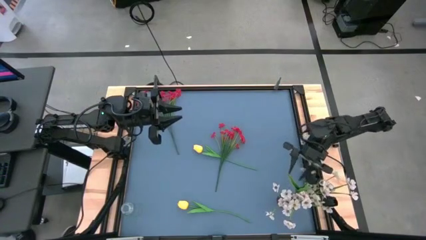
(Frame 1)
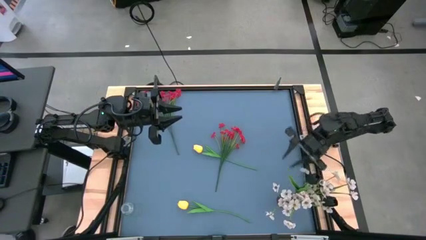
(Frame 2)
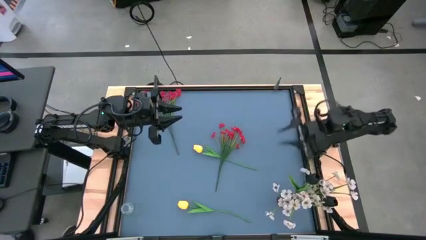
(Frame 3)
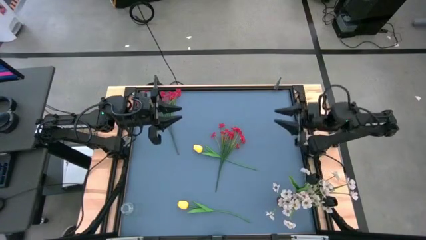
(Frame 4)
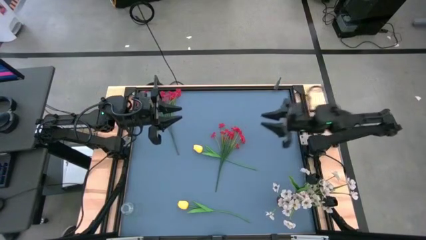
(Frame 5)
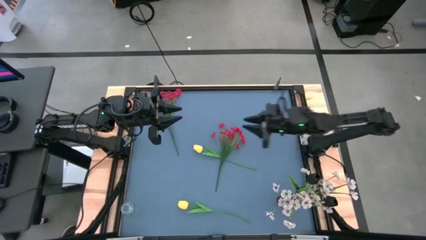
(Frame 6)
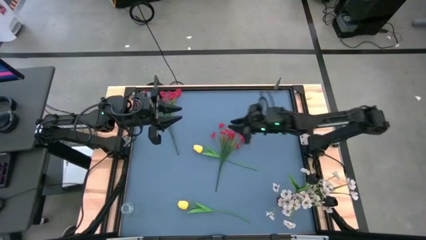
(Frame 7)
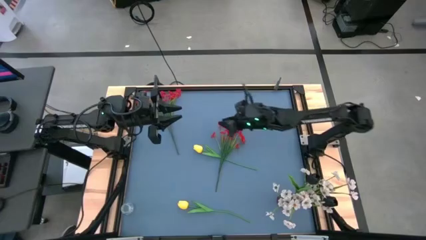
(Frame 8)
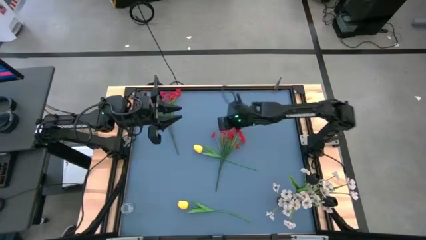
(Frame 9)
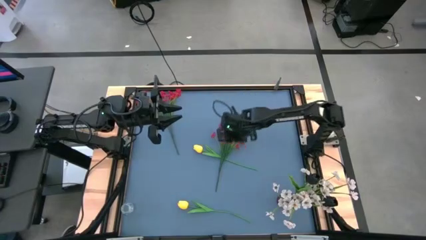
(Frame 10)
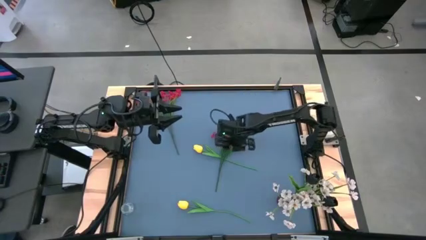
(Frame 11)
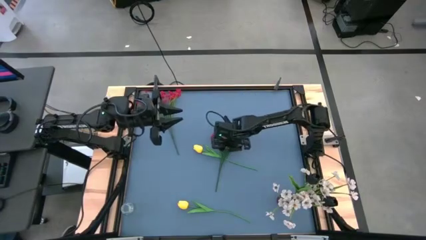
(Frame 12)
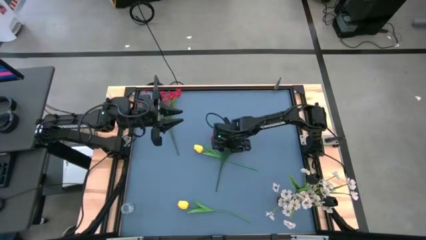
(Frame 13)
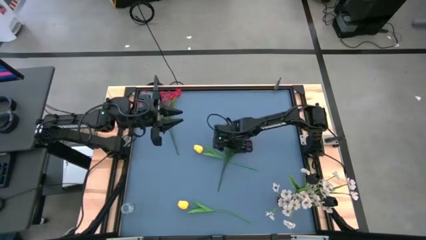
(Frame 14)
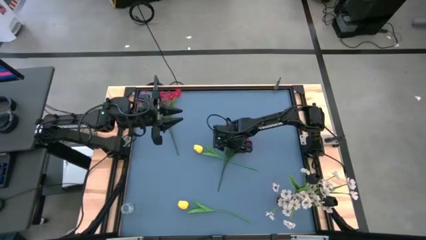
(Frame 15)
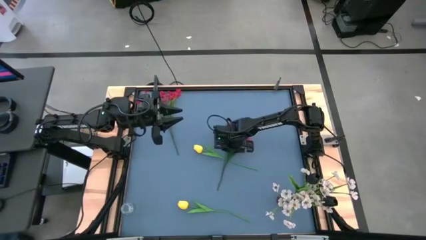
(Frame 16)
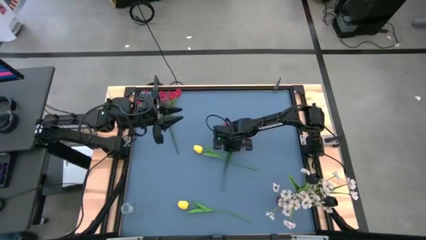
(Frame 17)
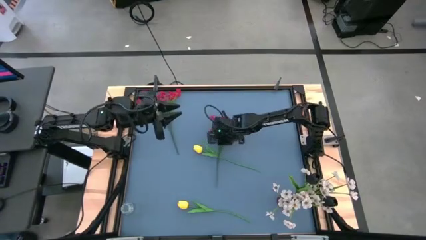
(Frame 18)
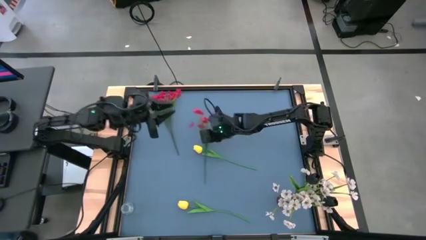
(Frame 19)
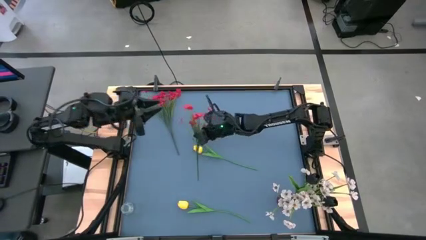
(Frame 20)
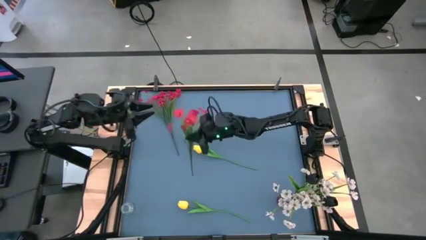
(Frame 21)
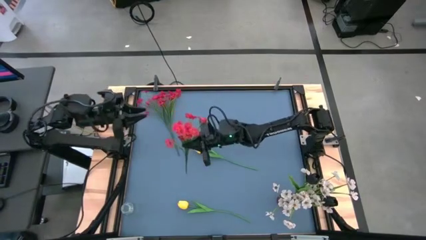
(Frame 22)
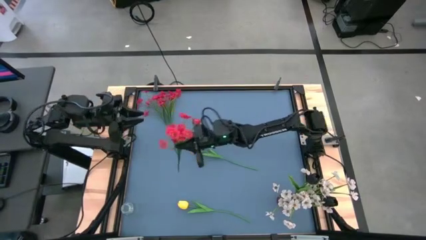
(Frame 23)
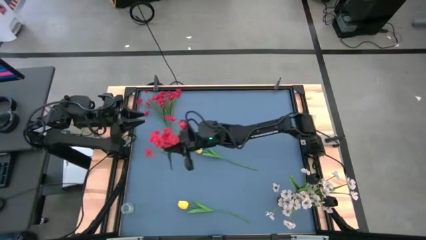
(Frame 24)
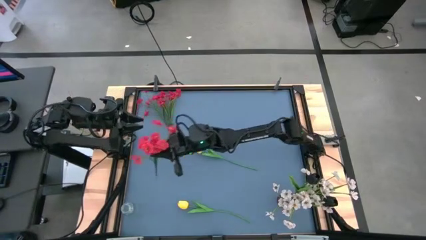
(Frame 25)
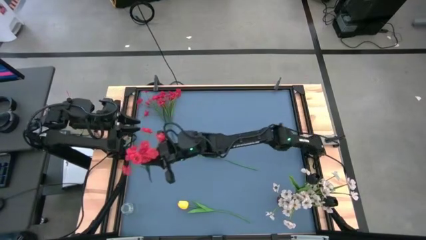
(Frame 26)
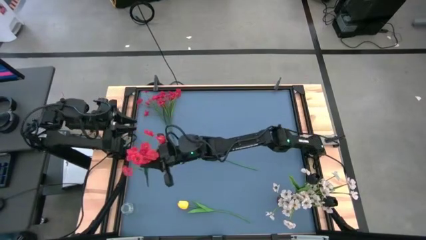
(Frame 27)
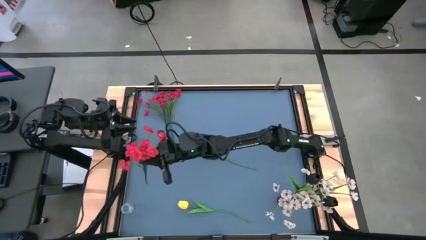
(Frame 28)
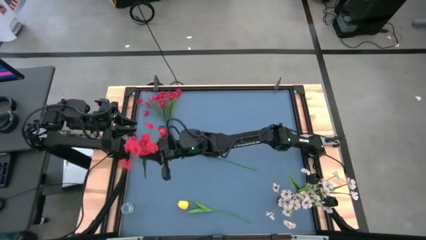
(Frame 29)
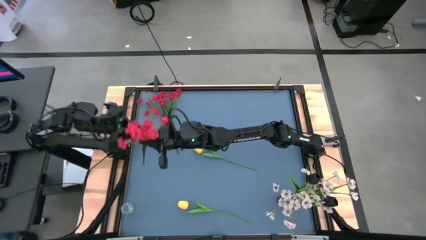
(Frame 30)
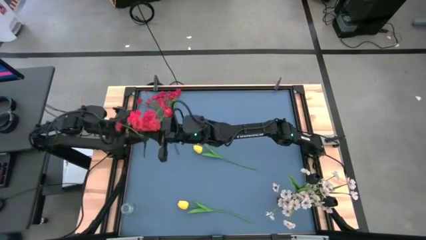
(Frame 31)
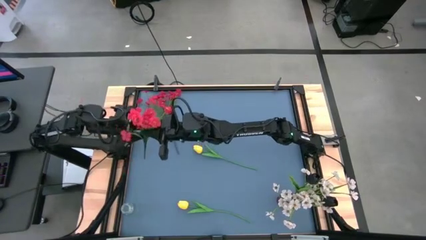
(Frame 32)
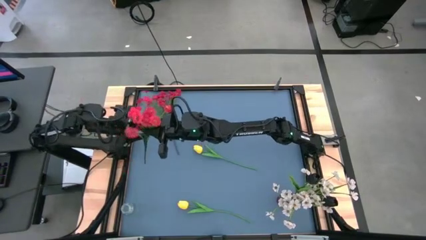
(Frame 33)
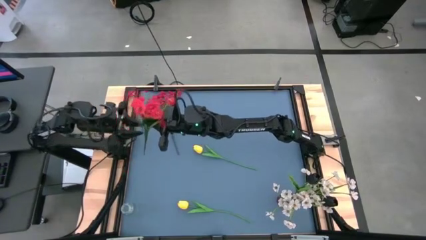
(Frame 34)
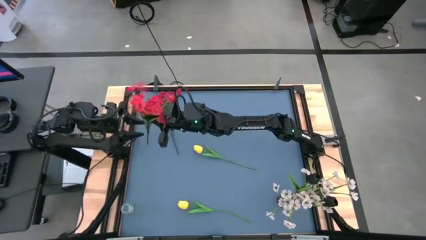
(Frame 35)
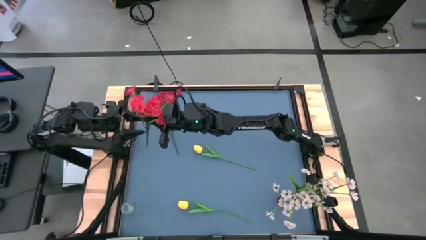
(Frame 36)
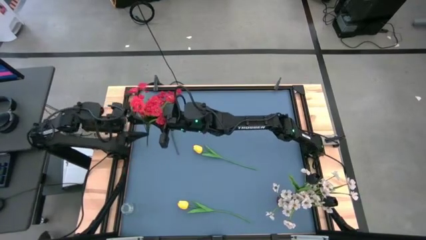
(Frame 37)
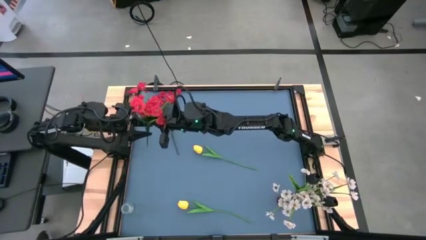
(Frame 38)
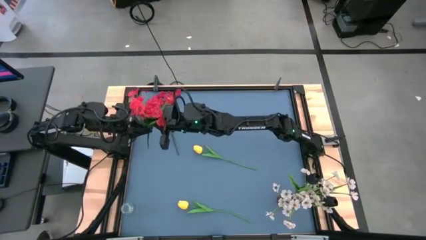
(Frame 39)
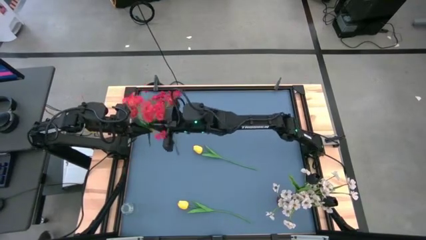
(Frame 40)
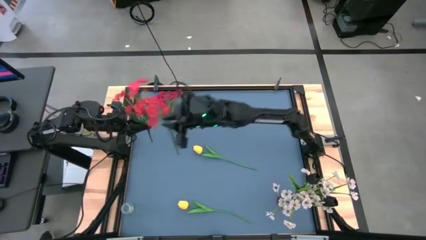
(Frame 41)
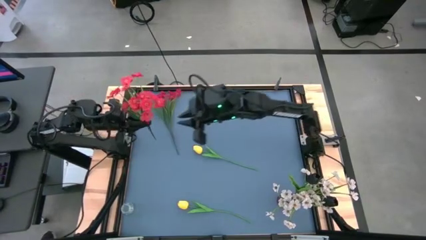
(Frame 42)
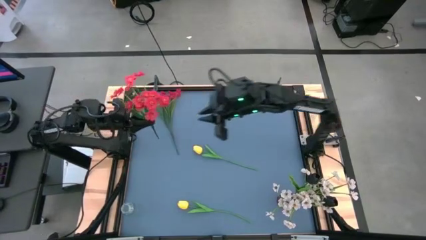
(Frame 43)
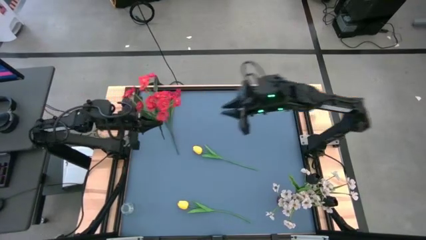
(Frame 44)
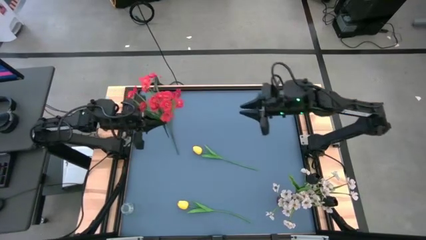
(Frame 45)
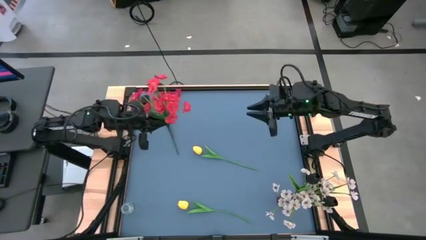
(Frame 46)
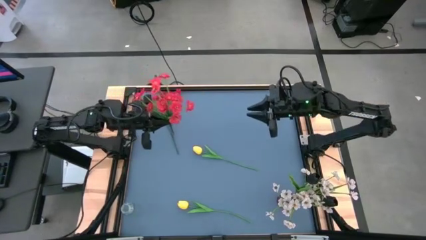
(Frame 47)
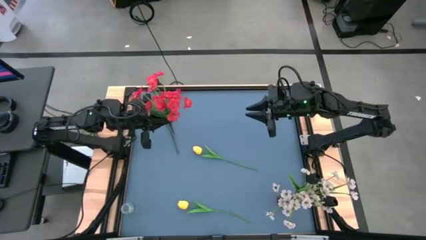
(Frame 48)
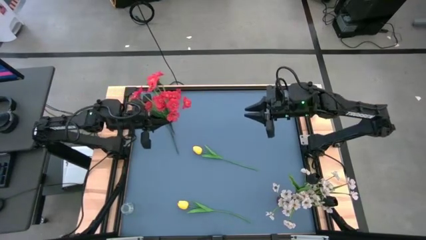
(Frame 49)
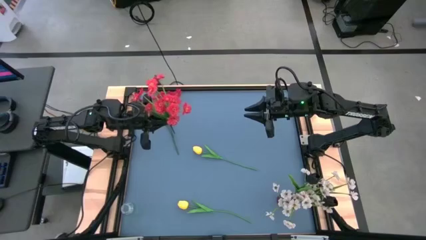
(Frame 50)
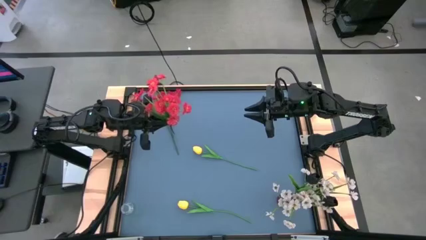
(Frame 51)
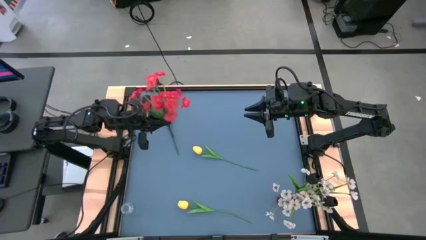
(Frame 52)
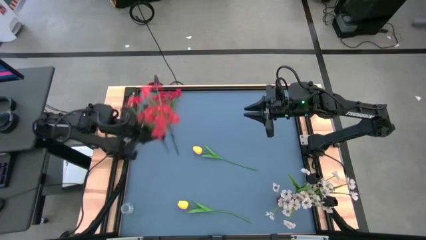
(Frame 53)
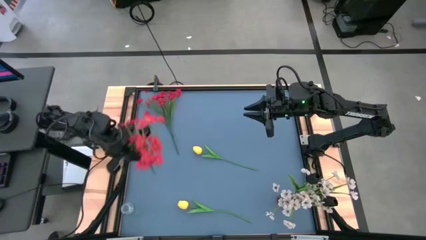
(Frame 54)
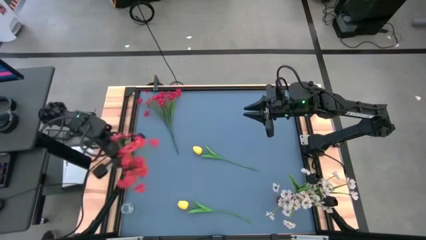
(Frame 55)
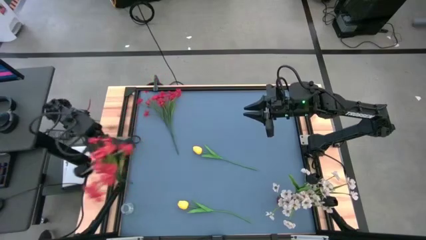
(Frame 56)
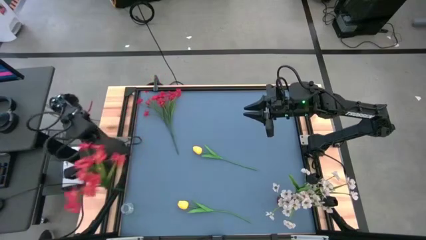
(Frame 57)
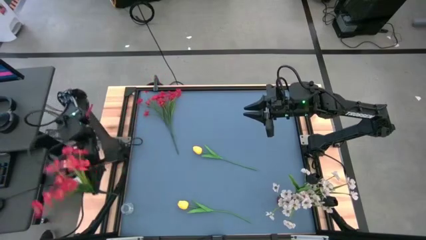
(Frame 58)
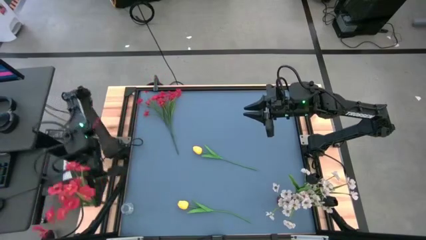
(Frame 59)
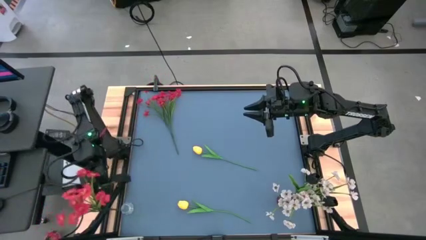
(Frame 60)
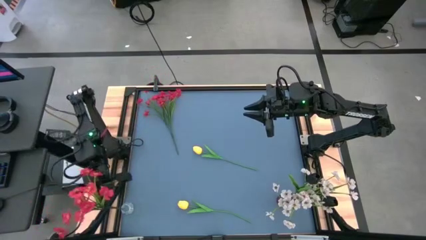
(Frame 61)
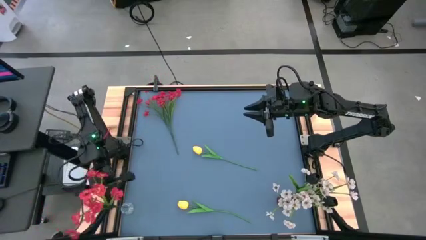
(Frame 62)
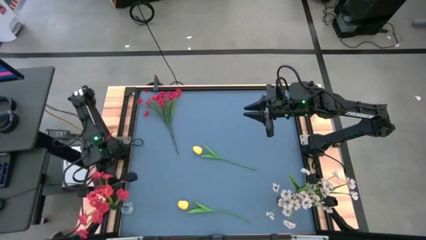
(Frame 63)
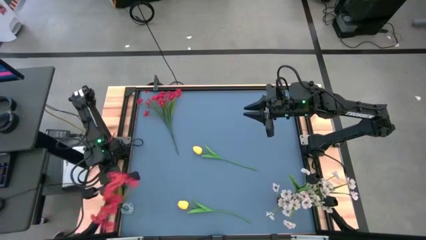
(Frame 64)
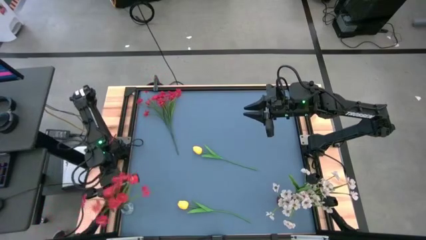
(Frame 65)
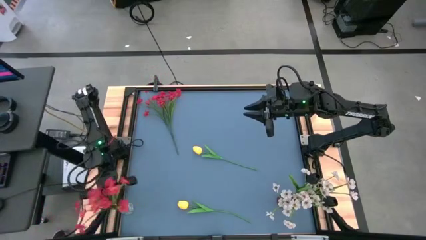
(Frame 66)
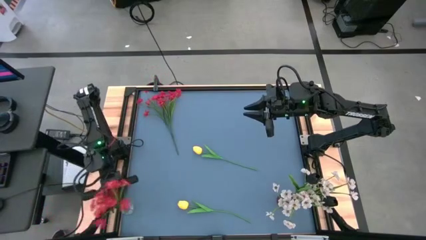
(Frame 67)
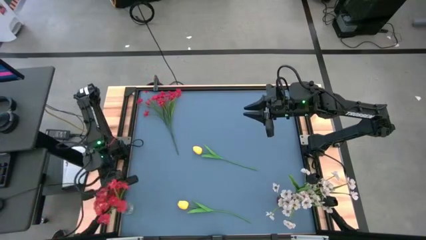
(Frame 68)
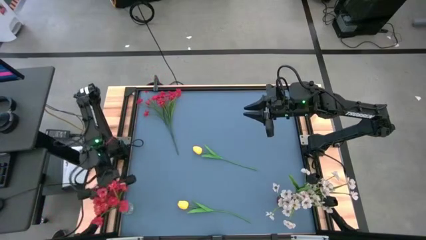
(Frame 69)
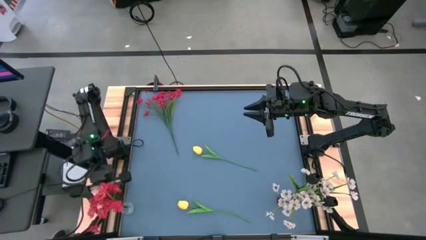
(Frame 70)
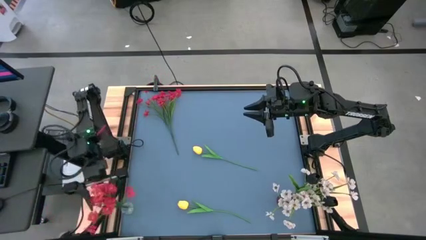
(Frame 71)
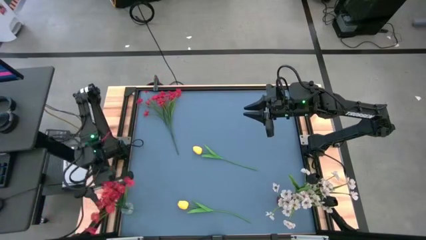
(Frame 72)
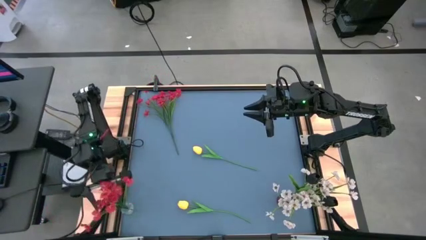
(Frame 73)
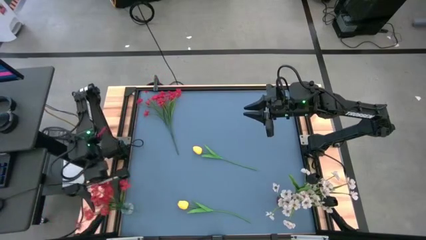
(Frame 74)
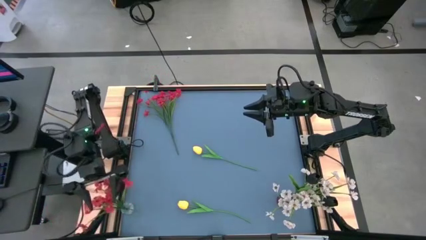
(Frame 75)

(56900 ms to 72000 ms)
Task: Sort flowers into vase by color
Put the bottom red flowers into the transparent vase
